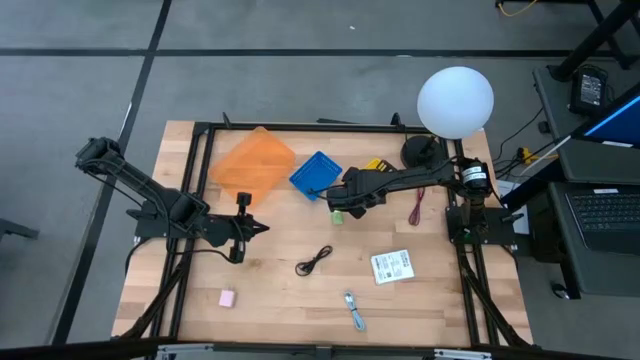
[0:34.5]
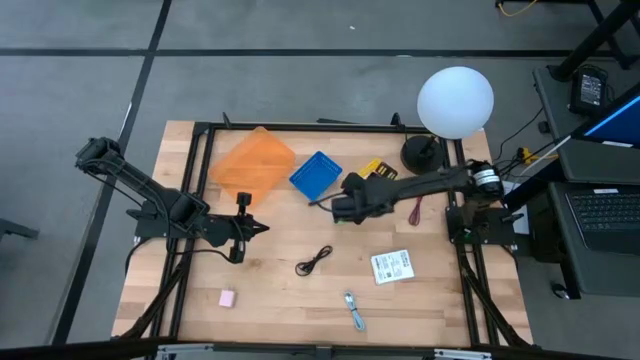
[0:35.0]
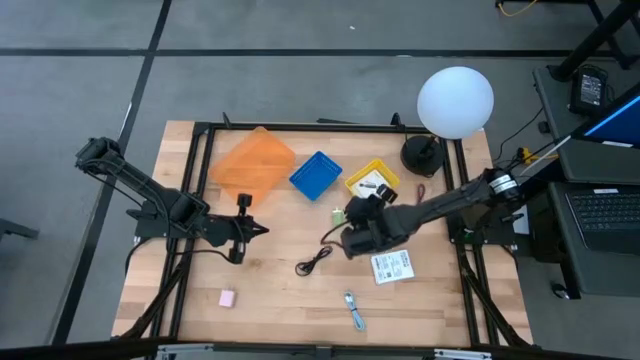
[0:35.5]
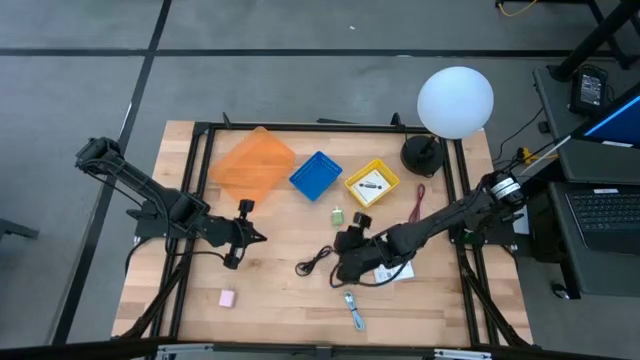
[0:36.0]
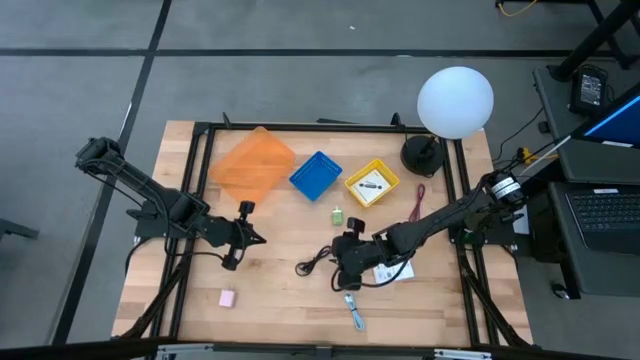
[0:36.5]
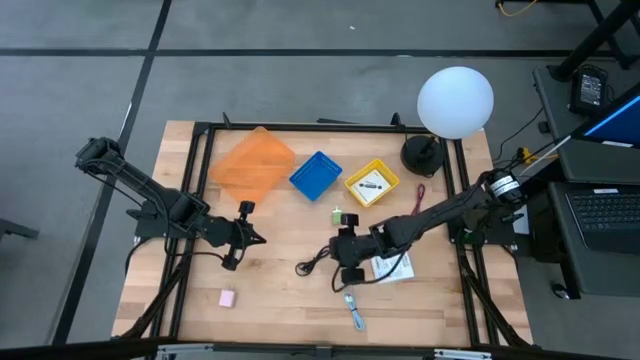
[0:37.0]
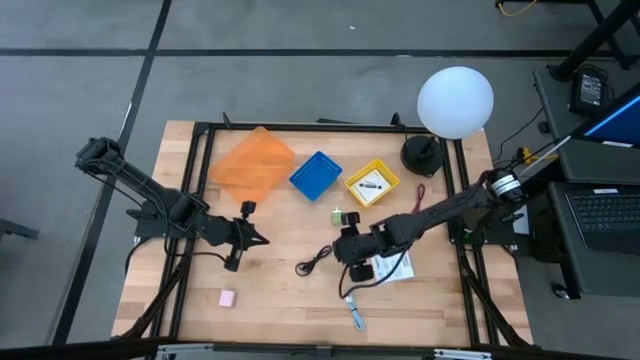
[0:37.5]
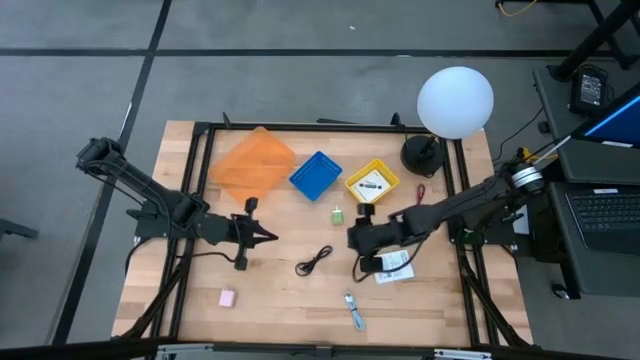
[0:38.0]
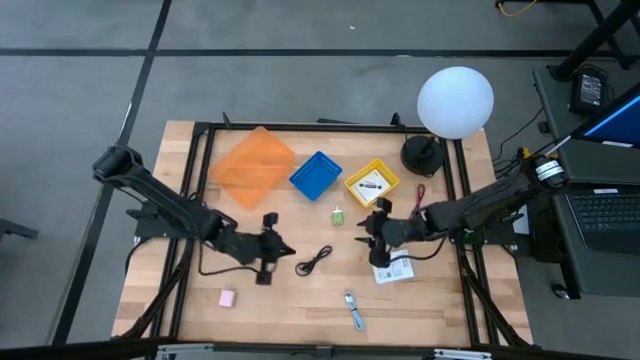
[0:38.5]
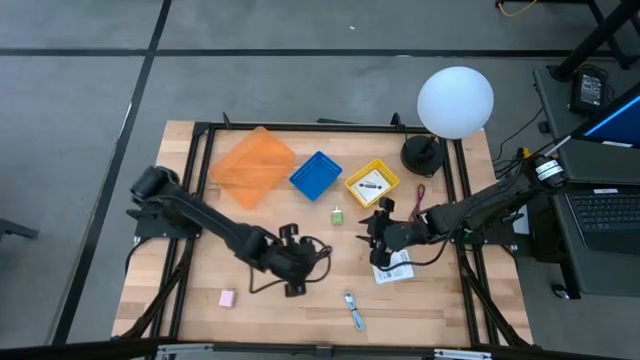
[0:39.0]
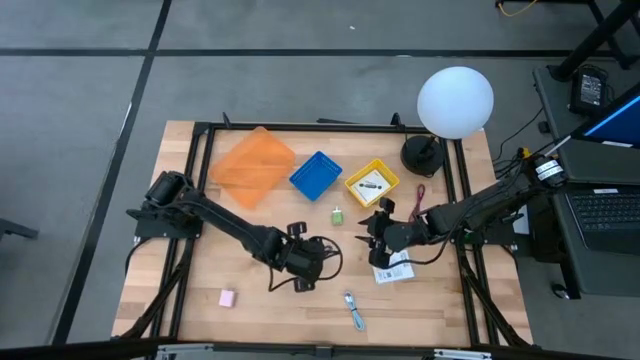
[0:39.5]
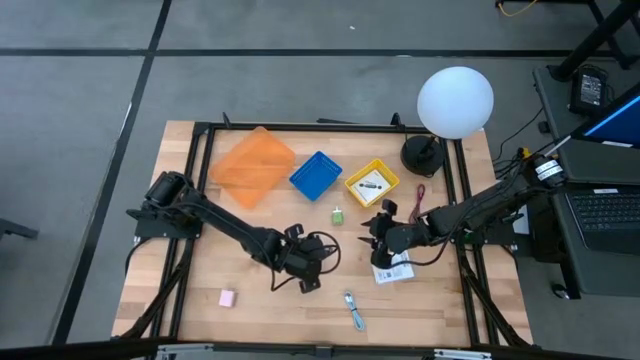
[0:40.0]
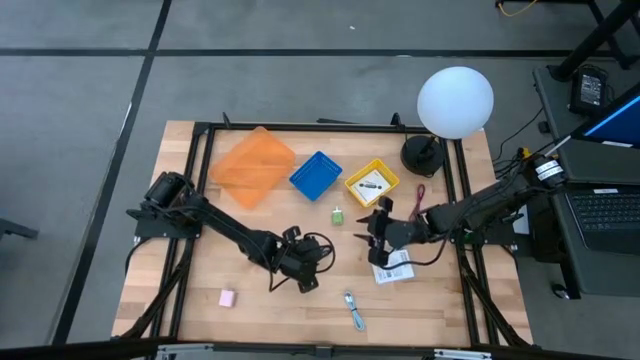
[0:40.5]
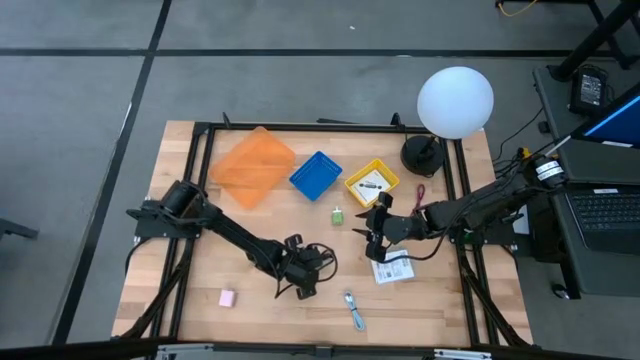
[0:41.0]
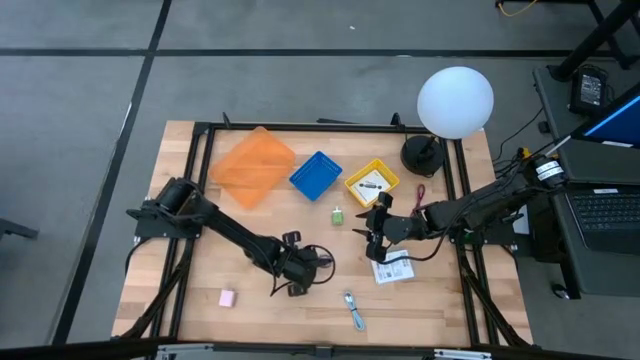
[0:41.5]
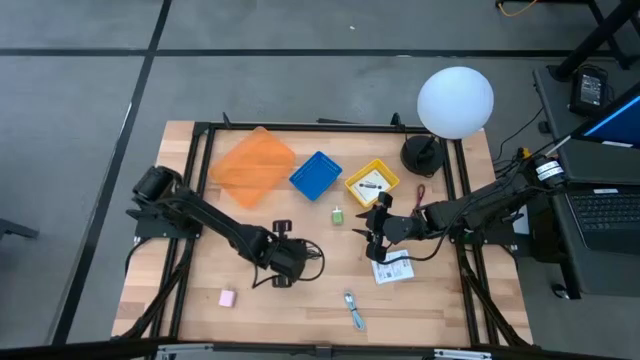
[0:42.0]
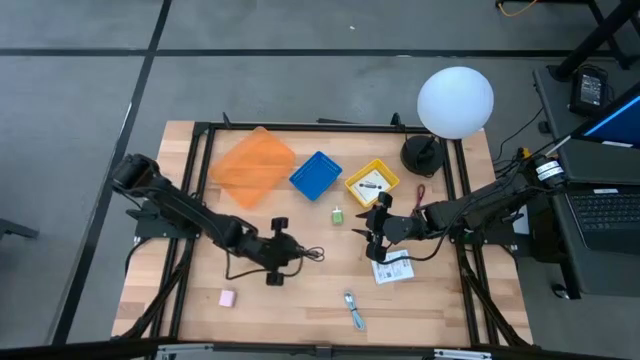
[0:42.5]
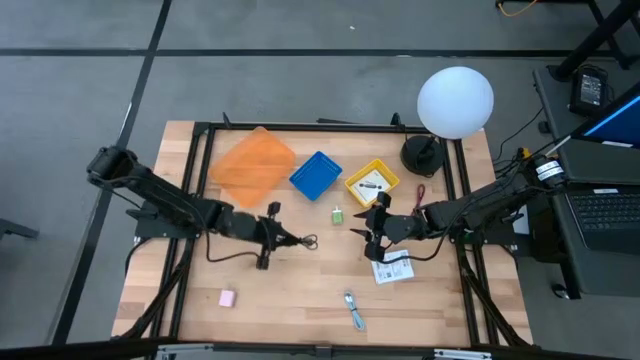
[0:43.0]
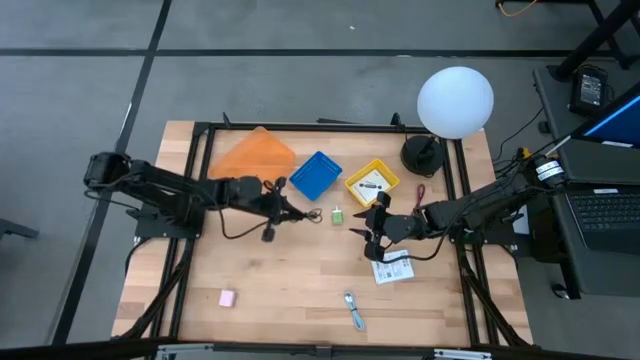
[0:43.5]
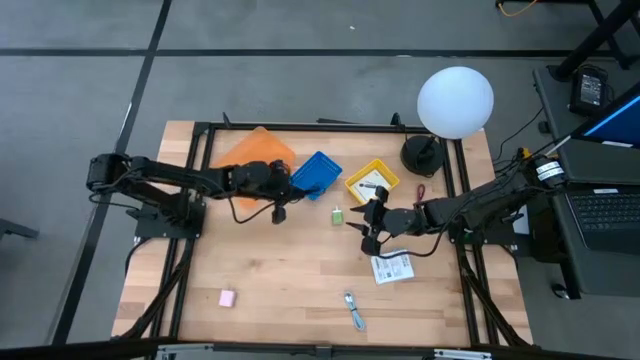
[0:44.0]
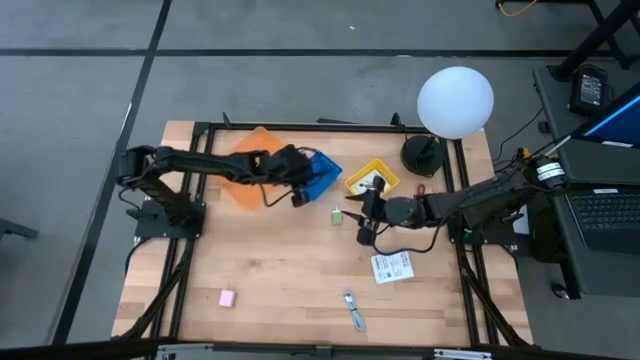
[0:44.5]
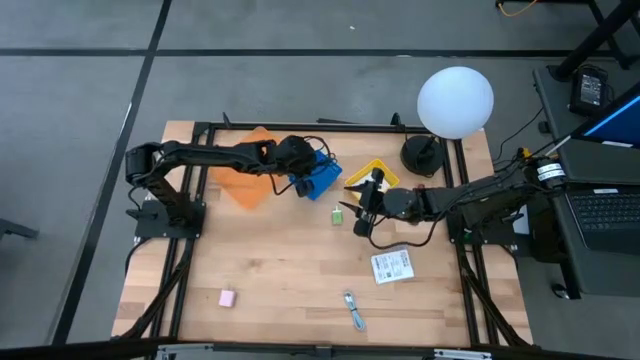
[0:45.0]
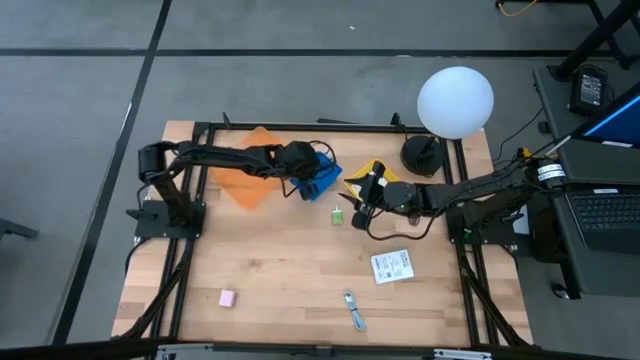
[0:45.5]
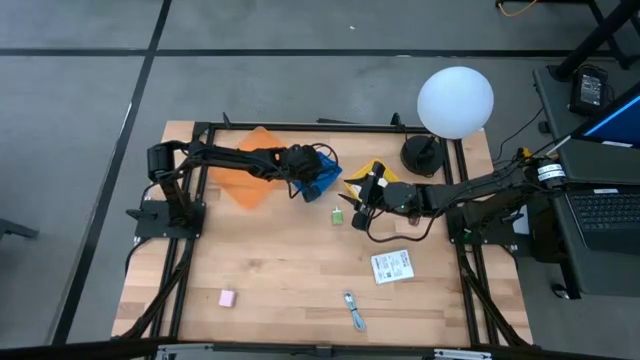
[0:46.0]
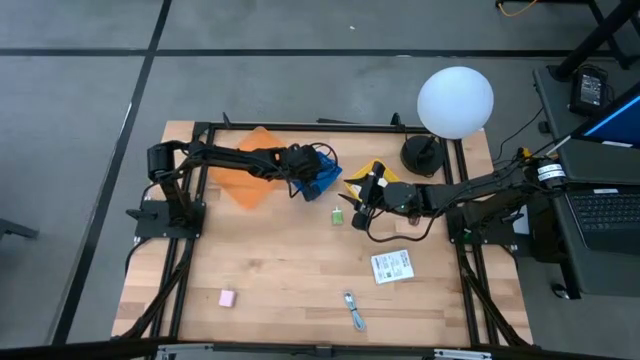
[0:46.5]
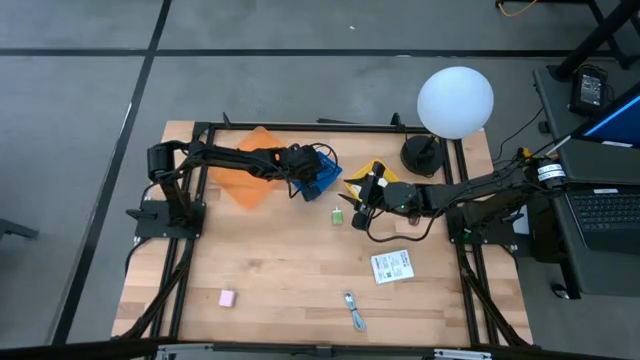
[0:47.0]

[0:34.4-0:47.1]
Task: Pick and place items into bin
Put the black charger cable into the blue bin

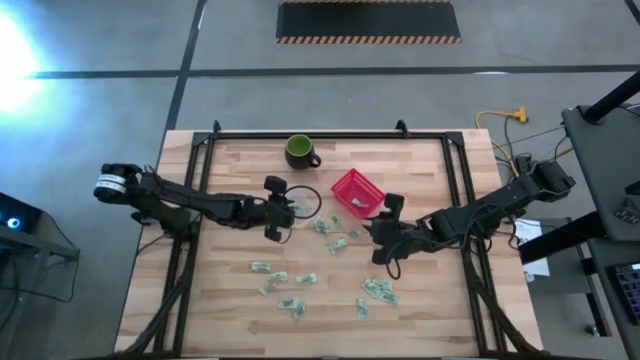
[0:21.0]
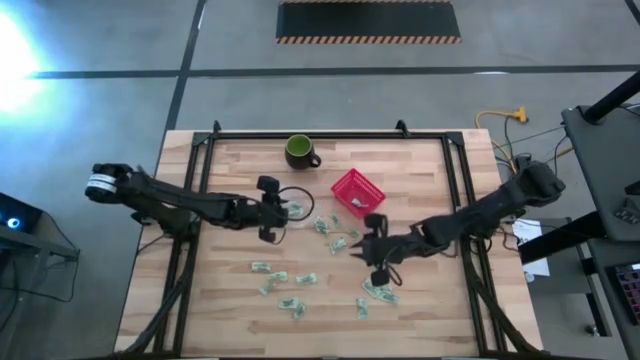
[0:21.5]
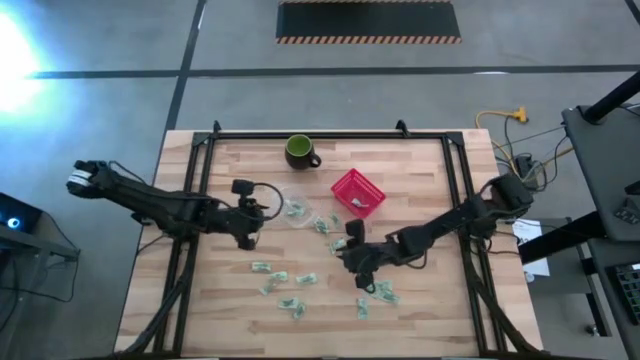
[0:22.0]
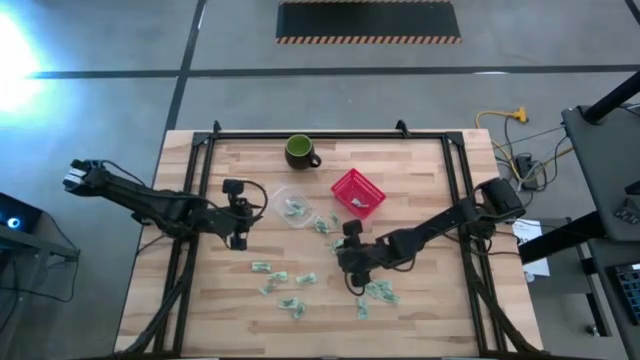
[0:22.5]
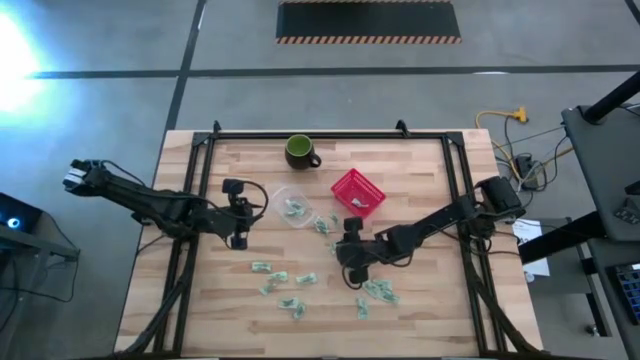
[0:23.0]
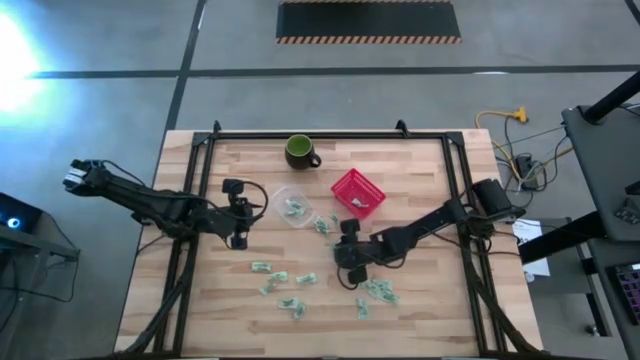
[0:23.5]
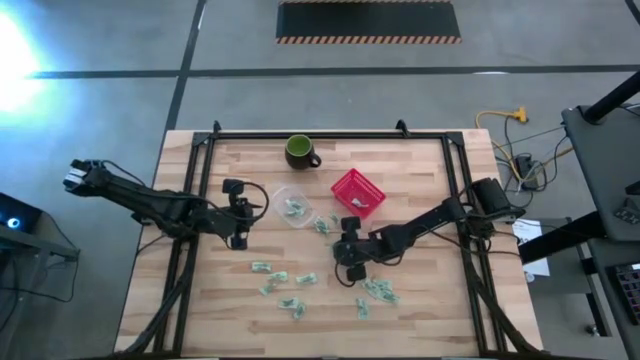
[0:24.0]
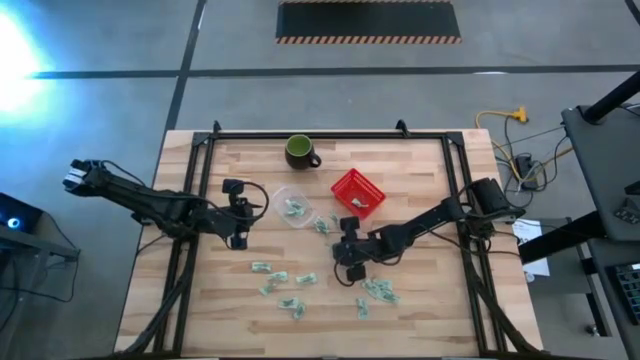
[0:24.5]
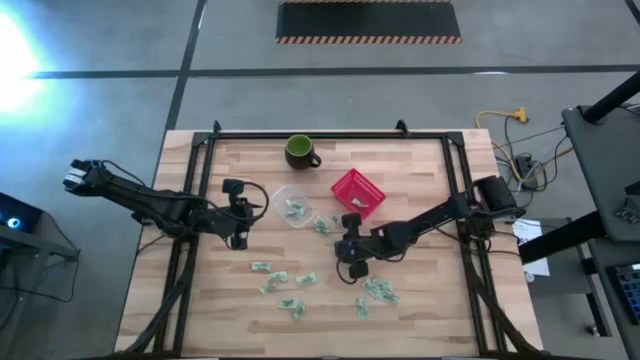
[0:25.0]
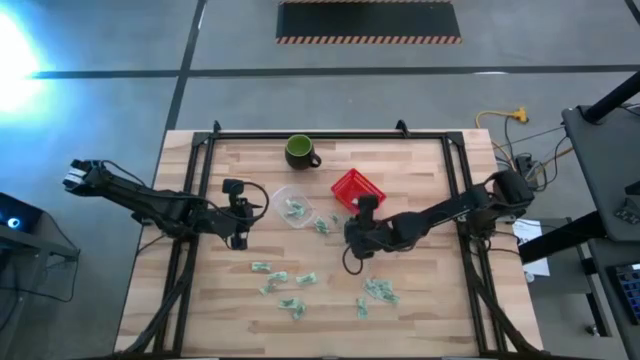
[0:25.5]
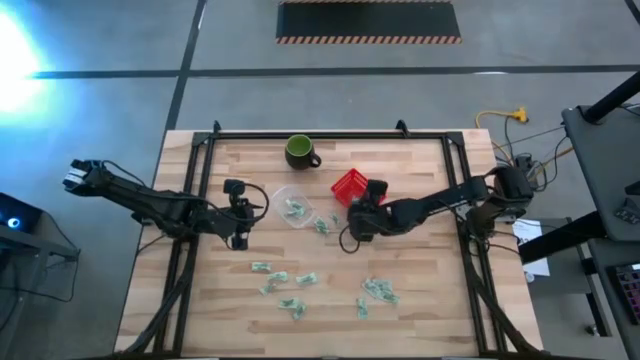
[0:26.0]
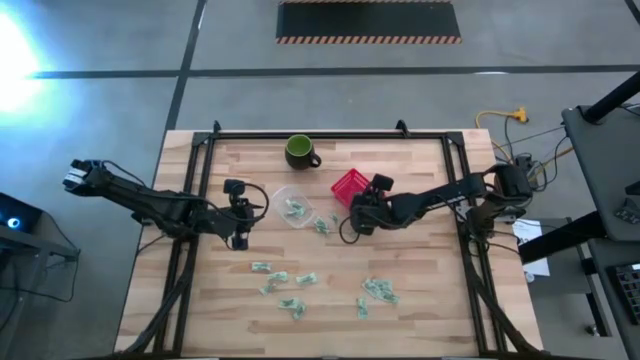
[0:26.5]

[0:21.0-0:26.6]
Task: Pick and place items into bin
Put the stevia packet into the red bin
